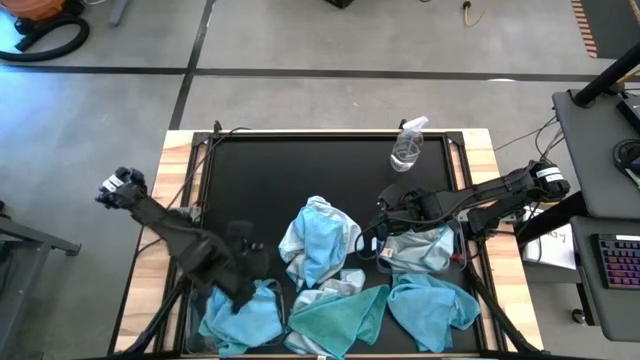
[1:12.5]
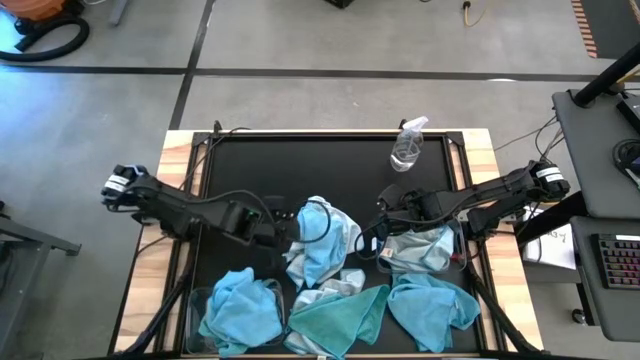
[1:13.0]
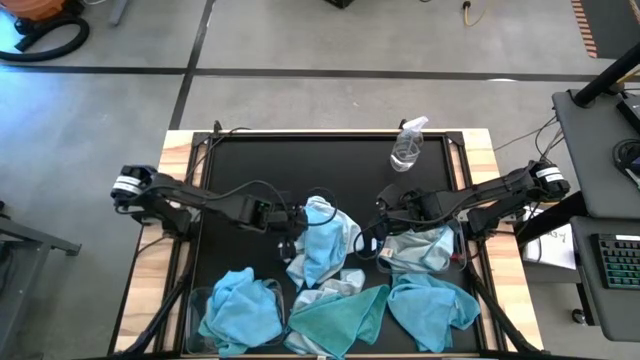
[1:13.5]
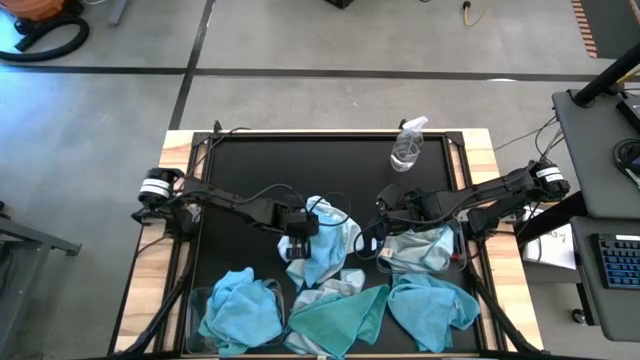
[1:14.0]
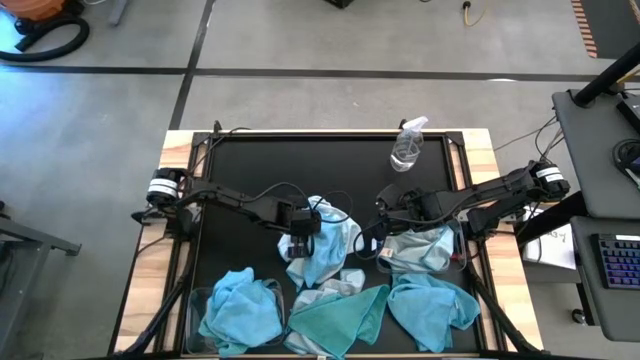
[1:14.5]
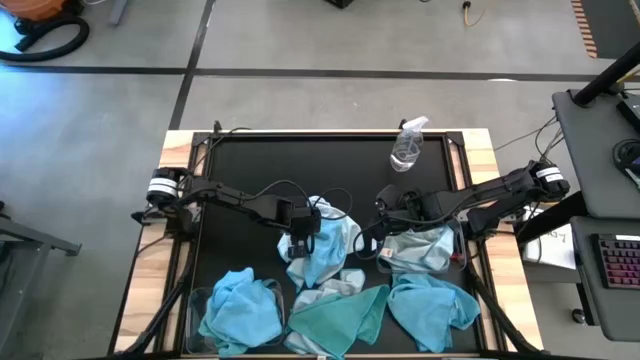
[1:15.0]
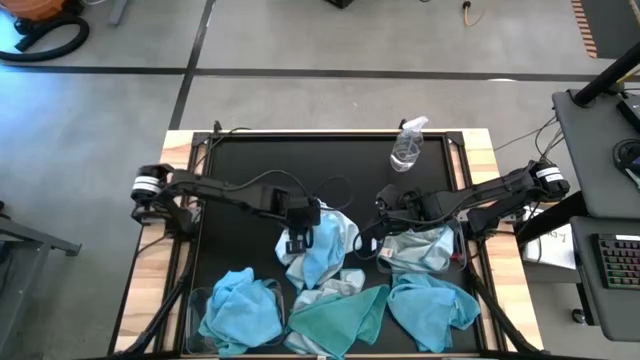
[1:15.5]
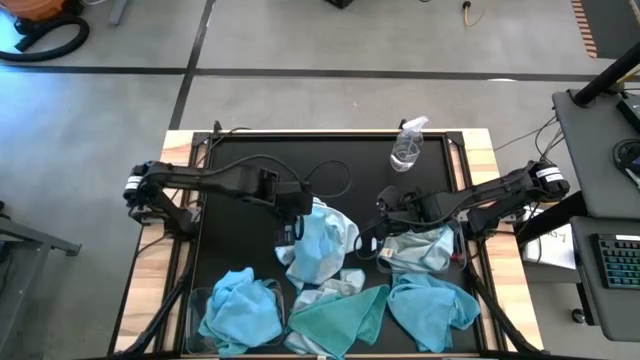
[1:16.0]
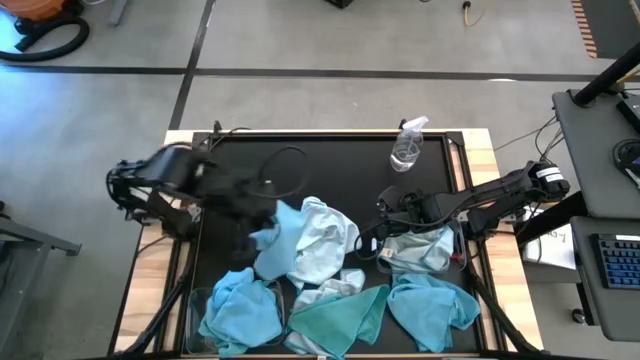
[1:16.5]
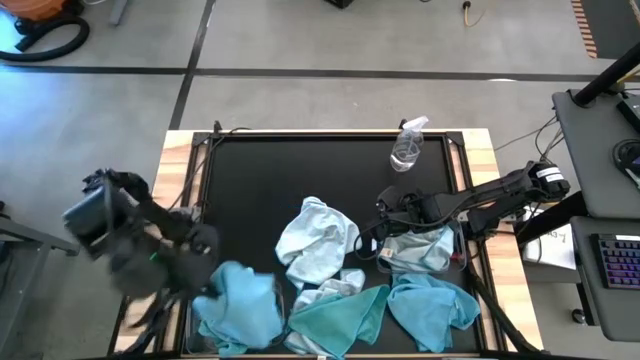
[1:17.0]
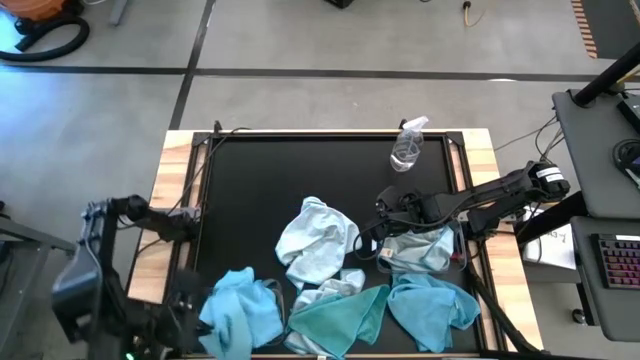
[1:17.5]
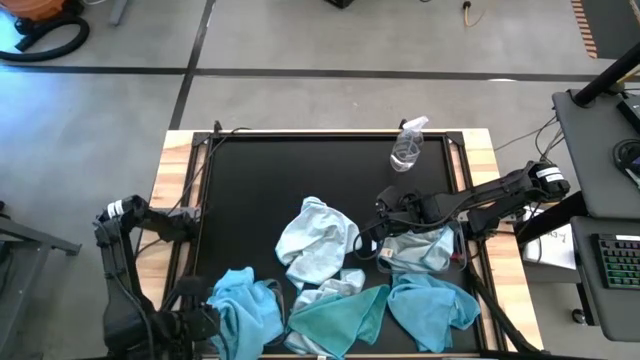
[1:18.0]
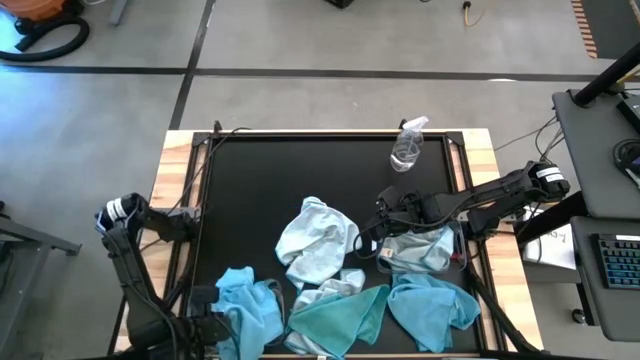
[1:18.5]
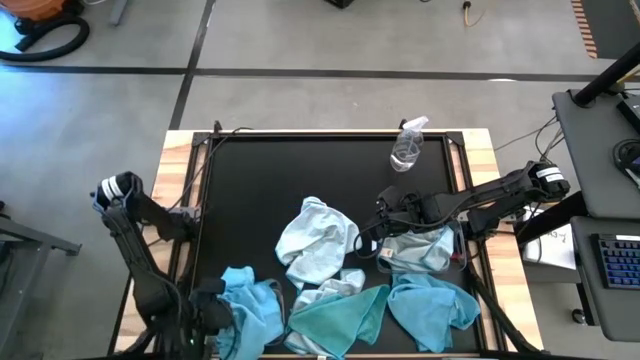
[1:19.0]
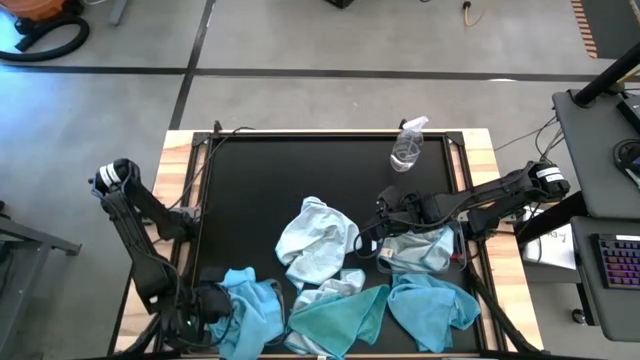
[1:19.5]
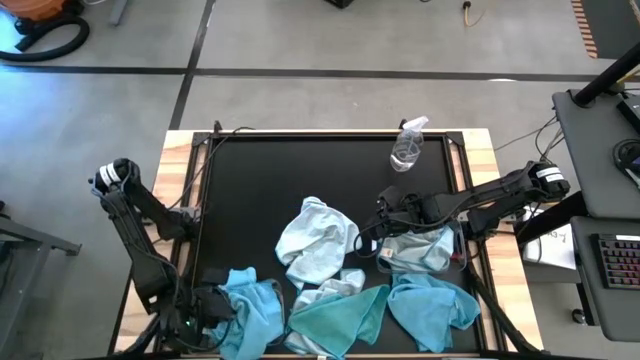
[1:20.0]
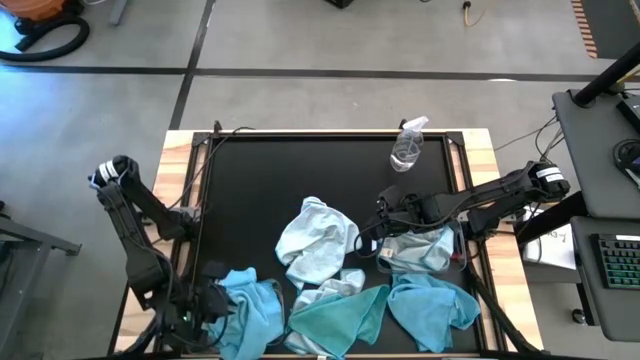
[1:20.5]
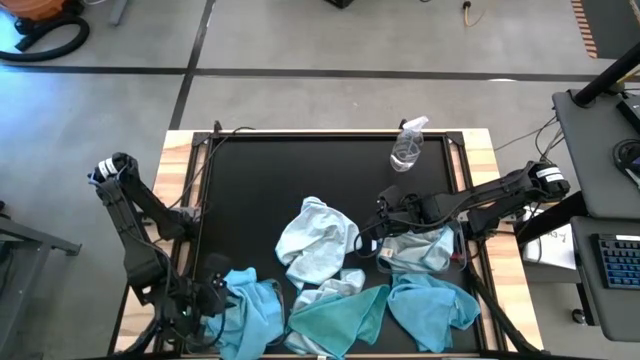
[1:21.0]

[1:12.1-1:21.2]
Task: Sort microfiber towel by color & place in baskets
Put the blue towel into the bottom transparent bin

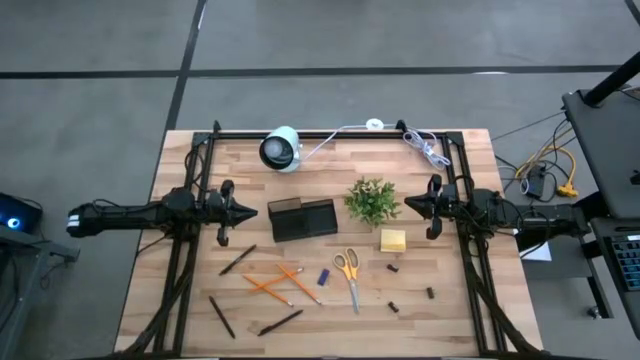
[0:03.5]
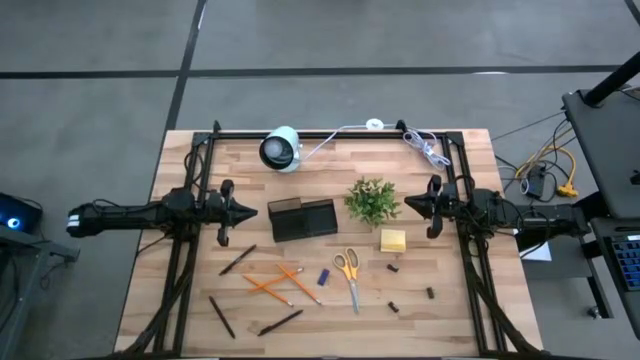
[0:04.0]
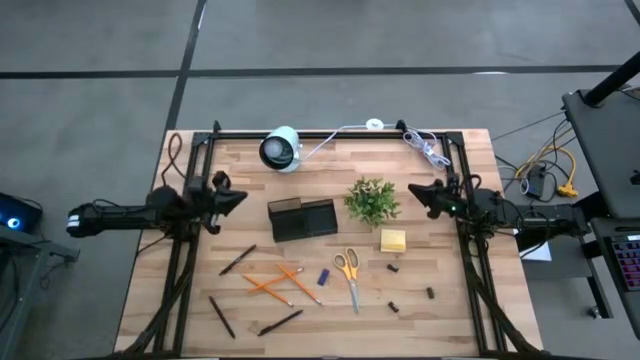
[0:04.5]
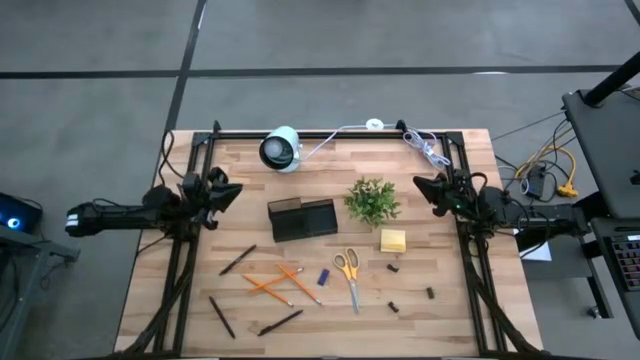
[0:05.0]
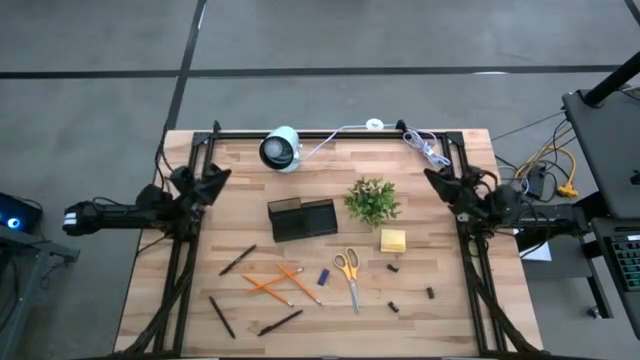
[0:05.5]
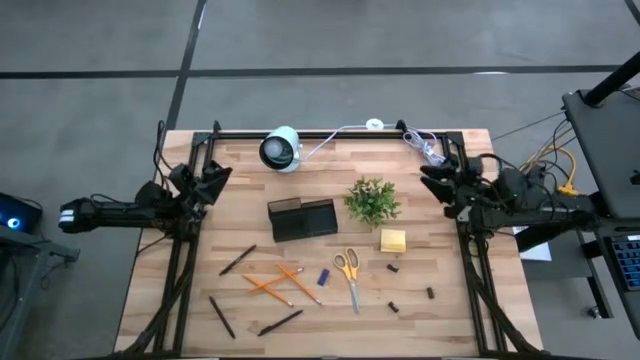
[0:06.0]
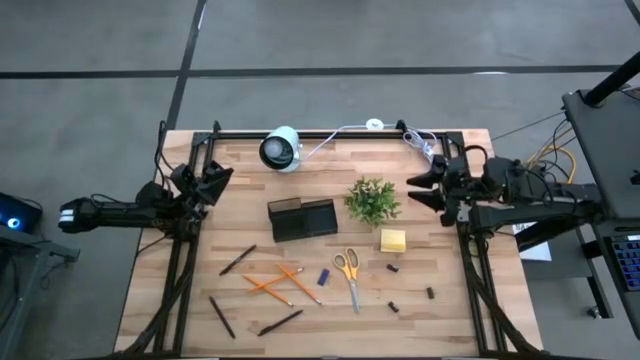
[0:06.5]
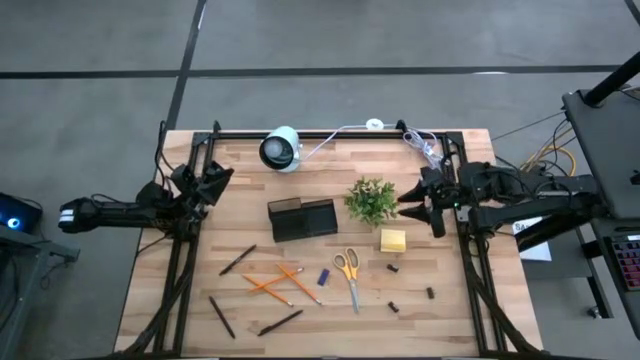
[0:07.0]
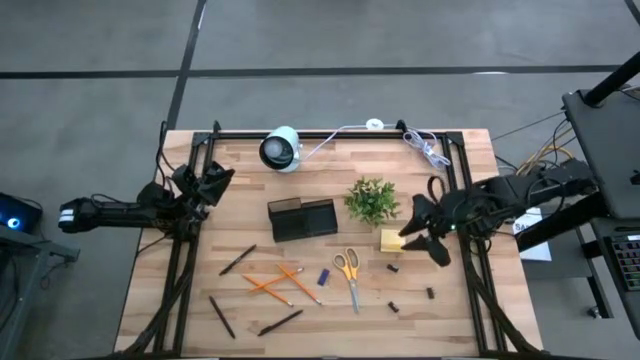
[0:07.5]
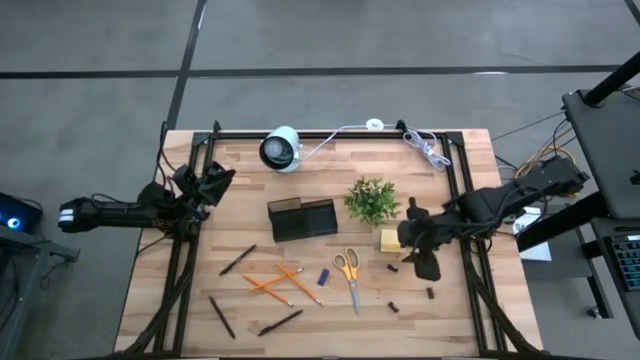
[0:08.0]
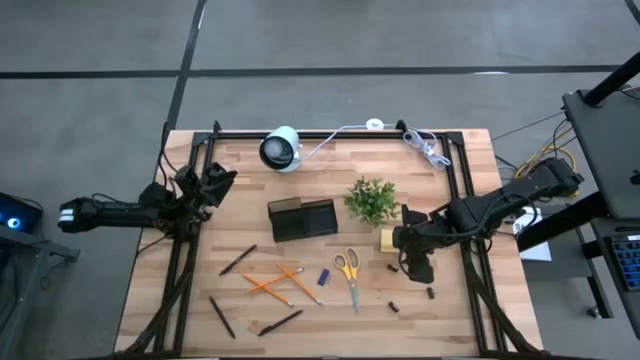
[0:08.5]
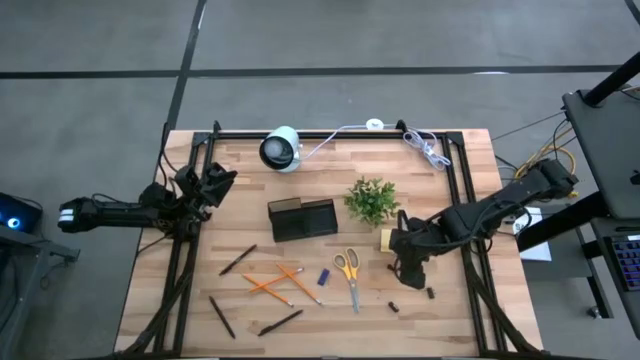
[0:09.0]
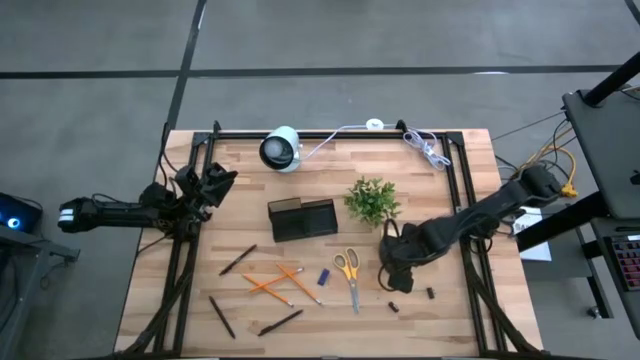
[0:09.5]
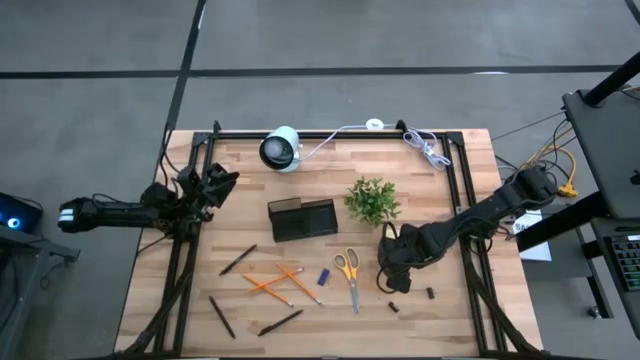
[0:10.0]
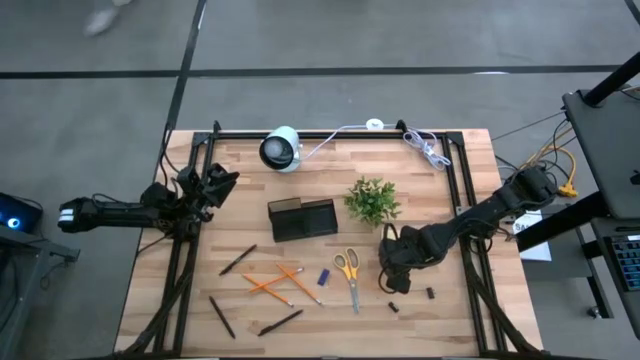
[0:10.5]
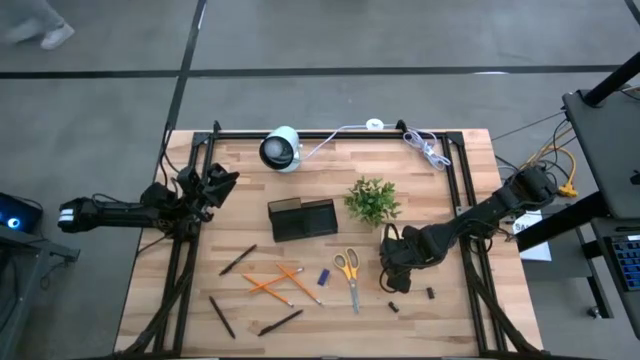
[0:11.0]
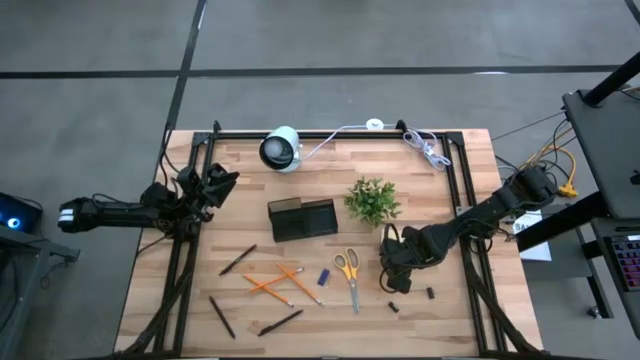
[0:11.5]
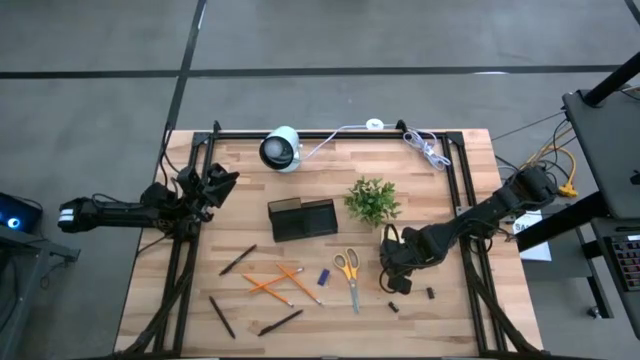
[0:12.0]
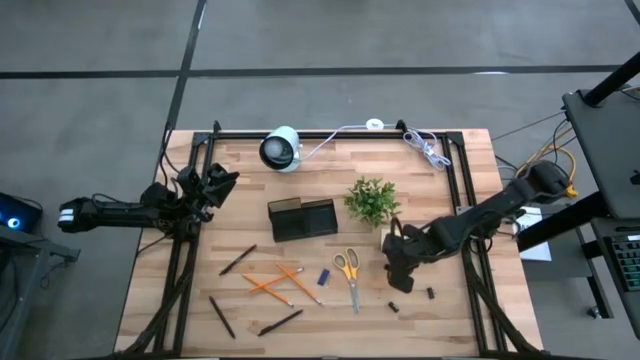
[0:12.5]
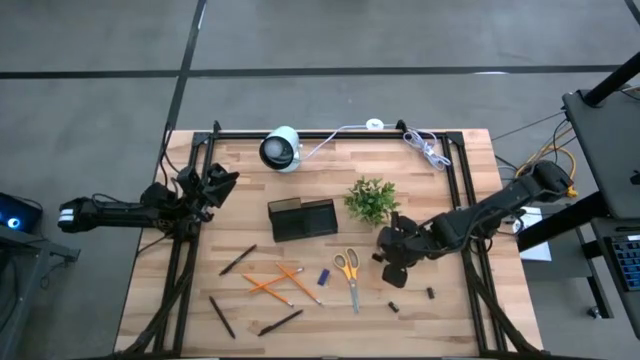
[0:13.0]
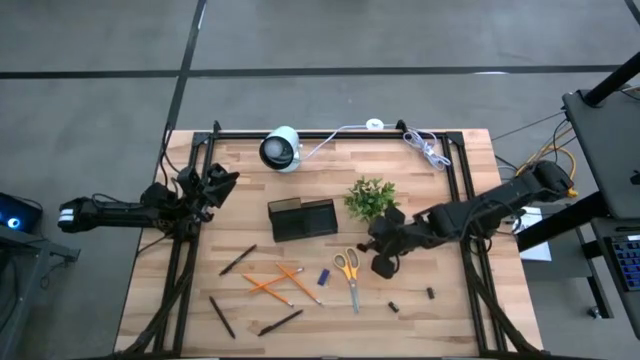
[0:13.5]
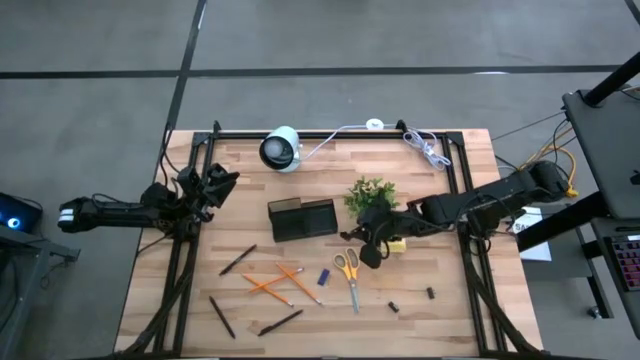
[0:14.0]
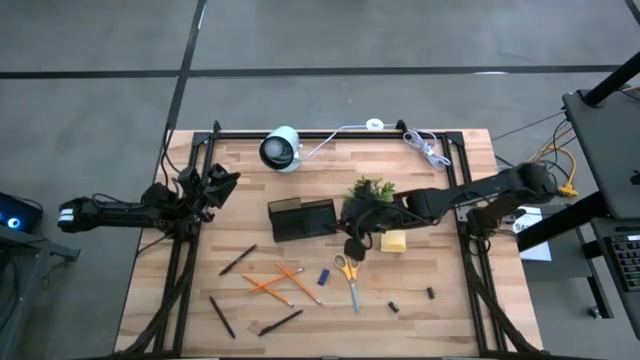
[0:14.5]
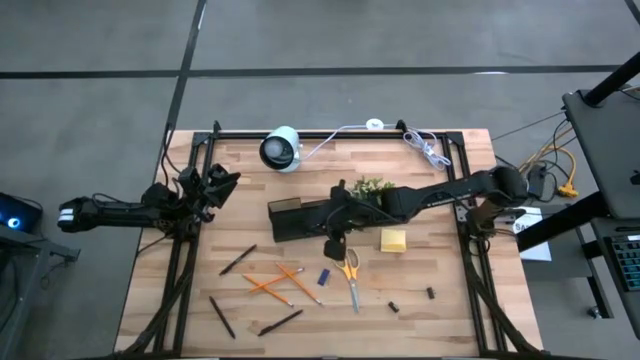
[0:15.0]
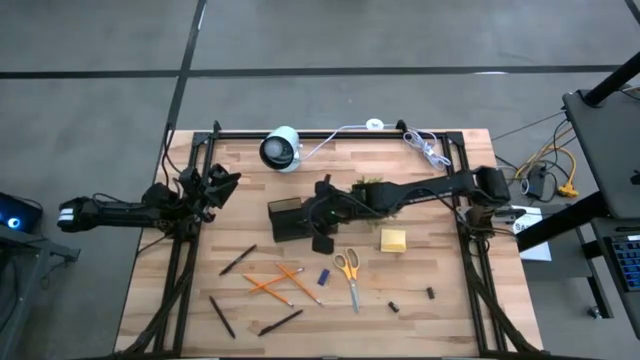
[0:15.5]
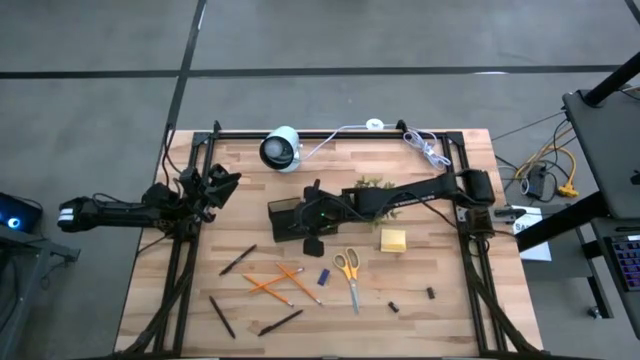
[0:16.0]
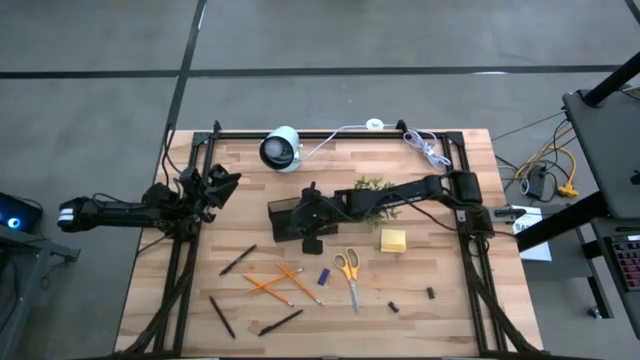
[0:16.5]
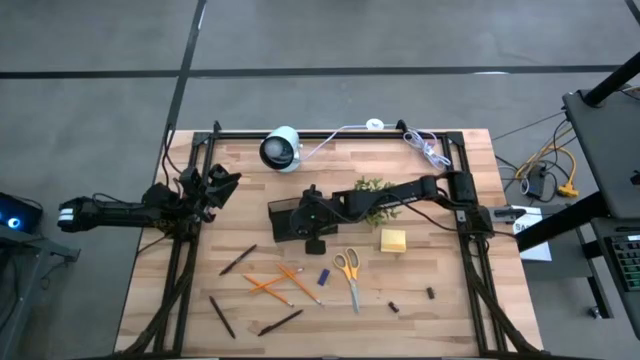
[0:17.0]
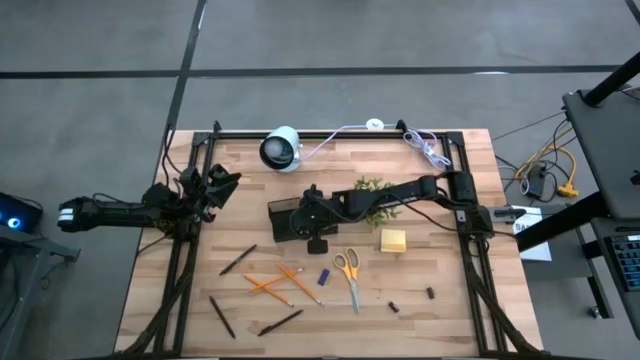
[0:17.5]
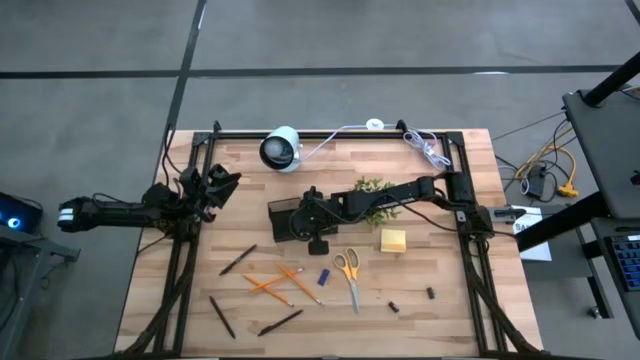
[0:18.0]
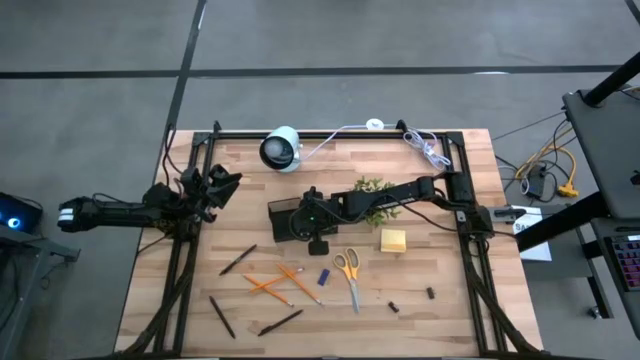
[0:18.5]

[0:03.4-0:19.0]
Task: Pick and place office supplies into organizer
Put the top binder clip in the black desk organizer
